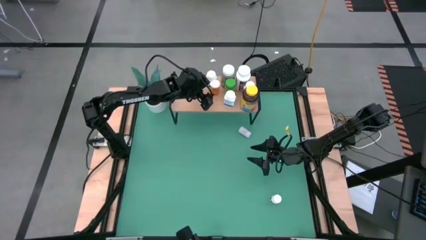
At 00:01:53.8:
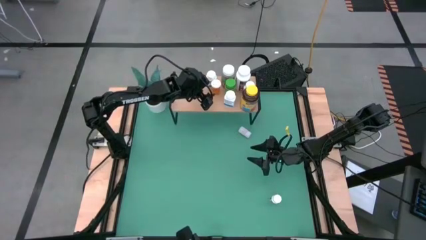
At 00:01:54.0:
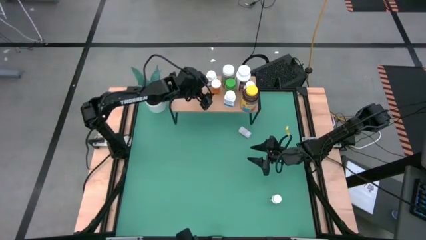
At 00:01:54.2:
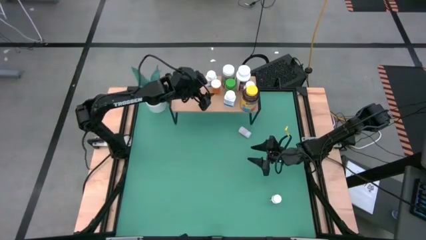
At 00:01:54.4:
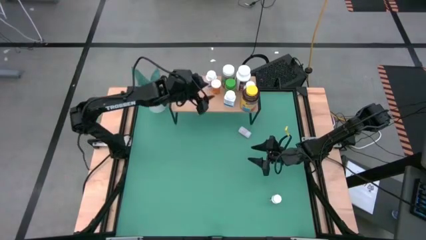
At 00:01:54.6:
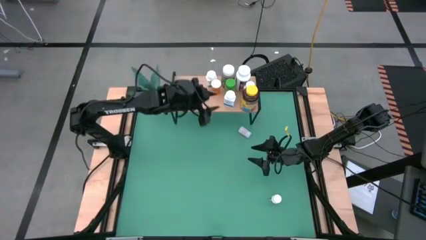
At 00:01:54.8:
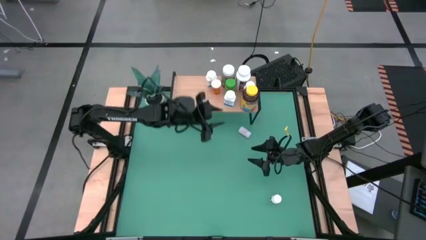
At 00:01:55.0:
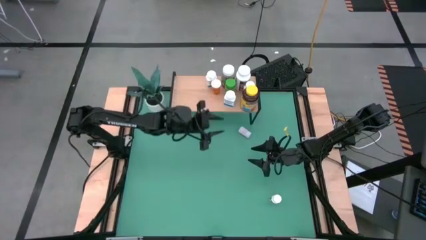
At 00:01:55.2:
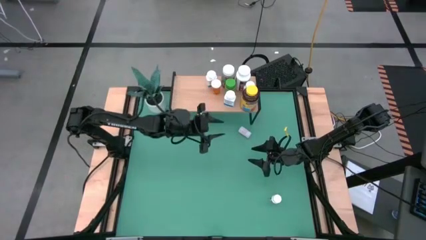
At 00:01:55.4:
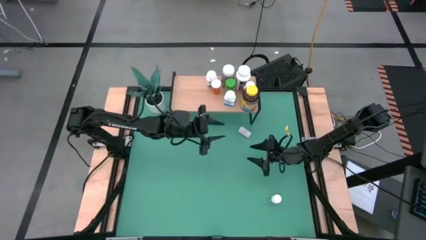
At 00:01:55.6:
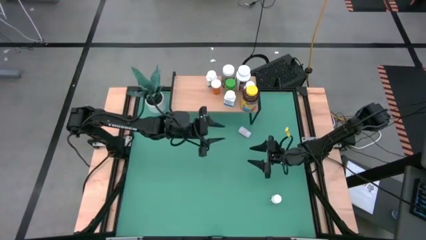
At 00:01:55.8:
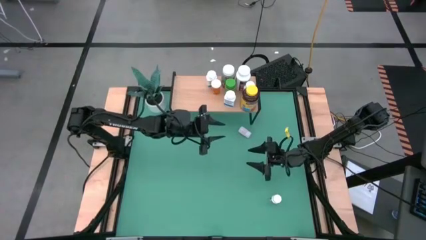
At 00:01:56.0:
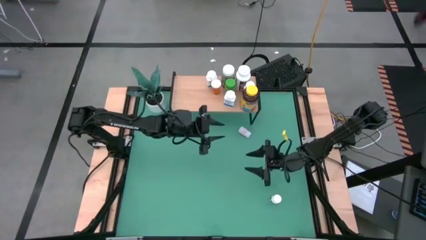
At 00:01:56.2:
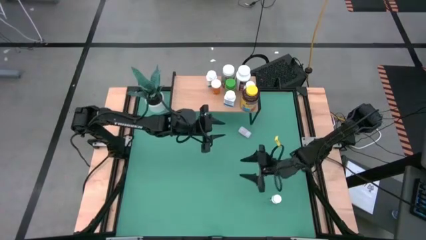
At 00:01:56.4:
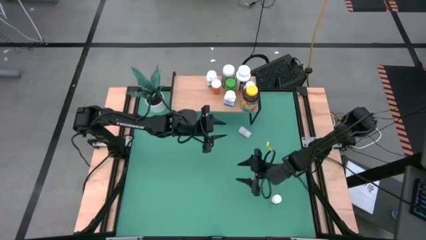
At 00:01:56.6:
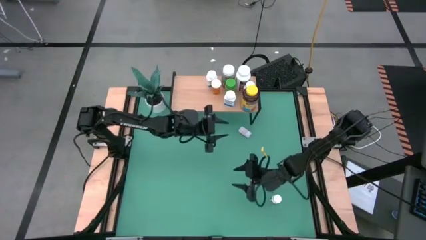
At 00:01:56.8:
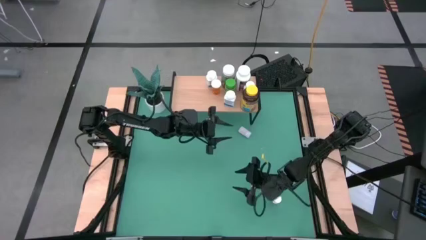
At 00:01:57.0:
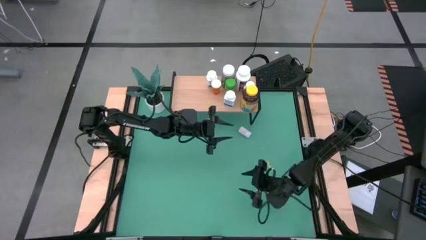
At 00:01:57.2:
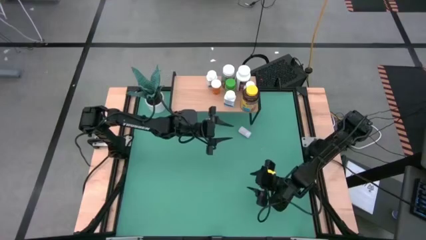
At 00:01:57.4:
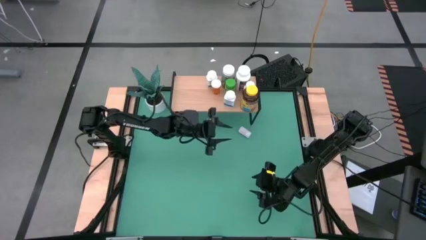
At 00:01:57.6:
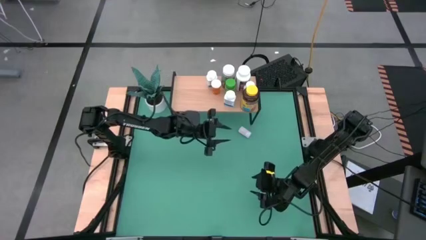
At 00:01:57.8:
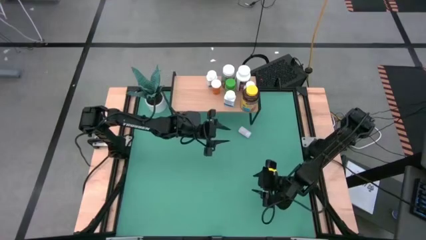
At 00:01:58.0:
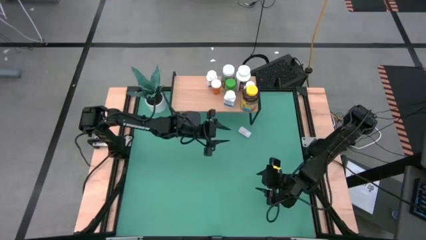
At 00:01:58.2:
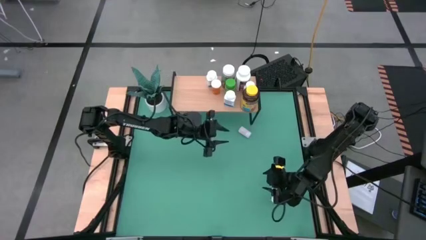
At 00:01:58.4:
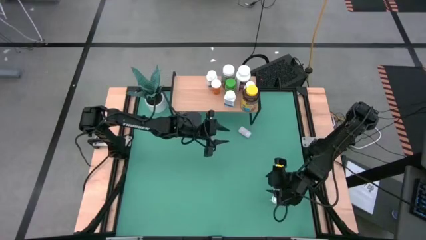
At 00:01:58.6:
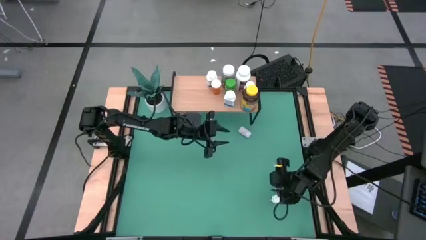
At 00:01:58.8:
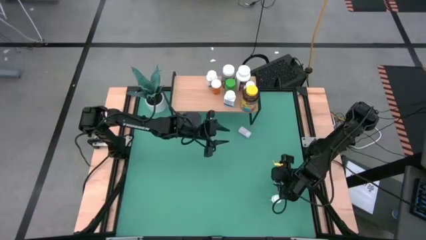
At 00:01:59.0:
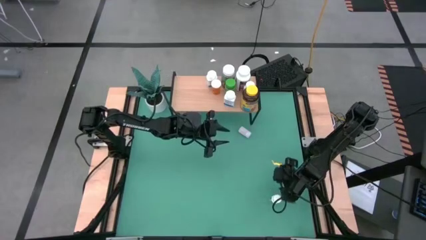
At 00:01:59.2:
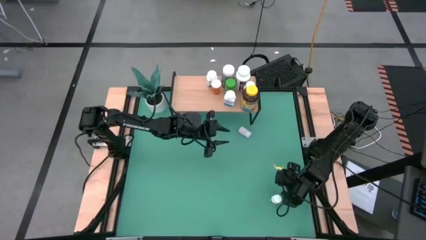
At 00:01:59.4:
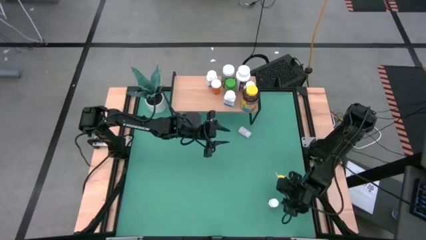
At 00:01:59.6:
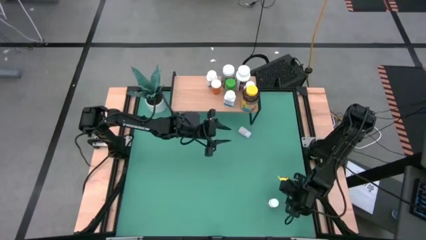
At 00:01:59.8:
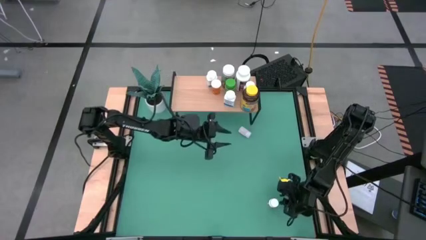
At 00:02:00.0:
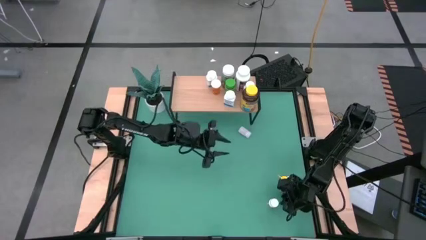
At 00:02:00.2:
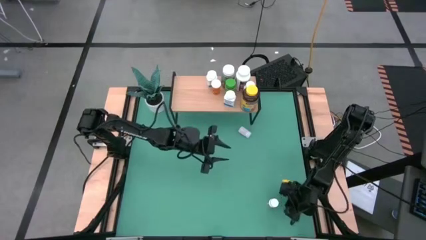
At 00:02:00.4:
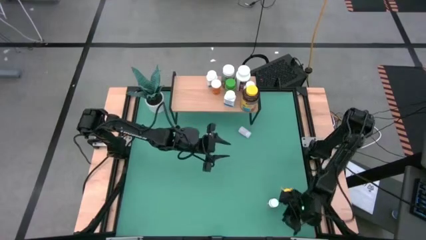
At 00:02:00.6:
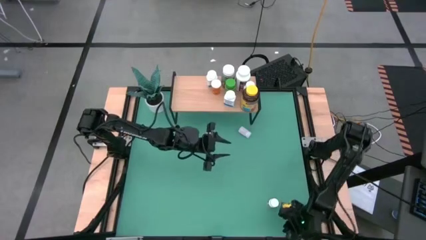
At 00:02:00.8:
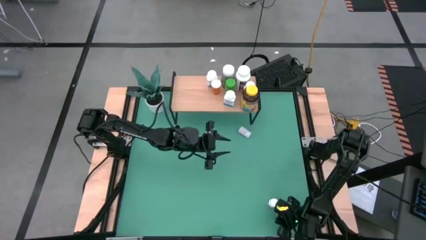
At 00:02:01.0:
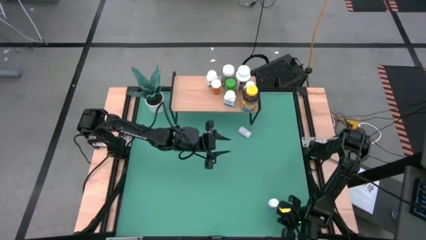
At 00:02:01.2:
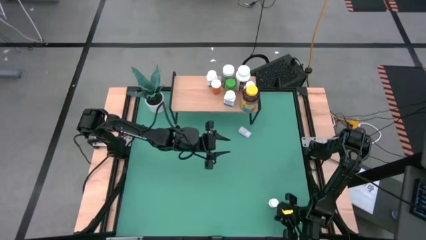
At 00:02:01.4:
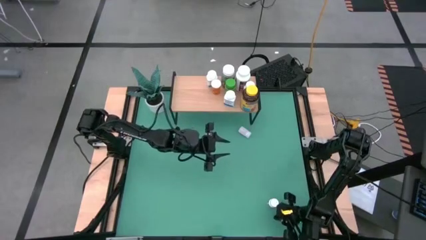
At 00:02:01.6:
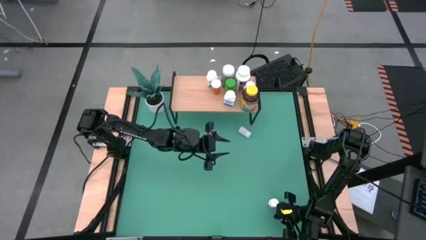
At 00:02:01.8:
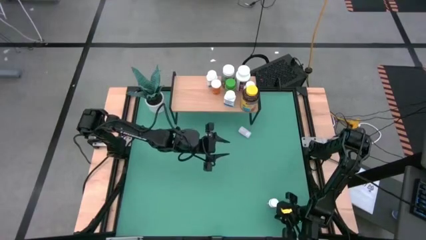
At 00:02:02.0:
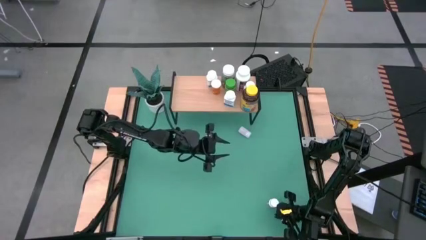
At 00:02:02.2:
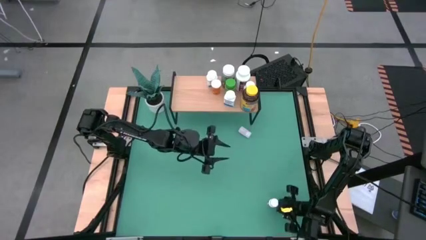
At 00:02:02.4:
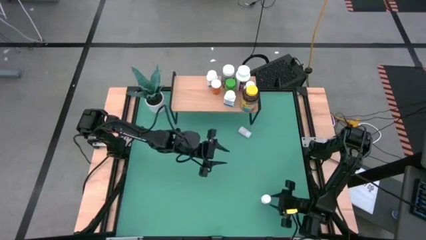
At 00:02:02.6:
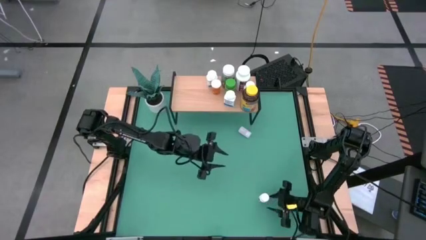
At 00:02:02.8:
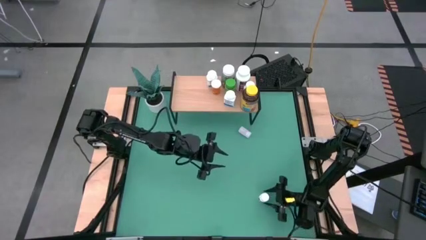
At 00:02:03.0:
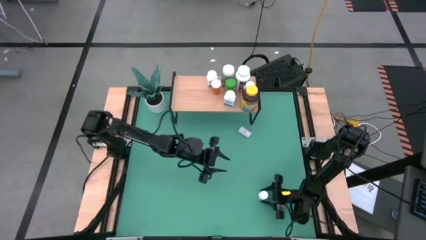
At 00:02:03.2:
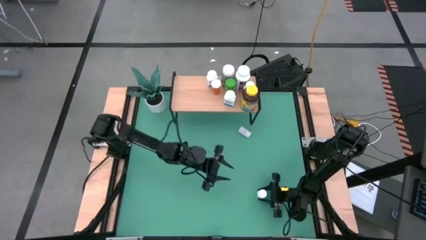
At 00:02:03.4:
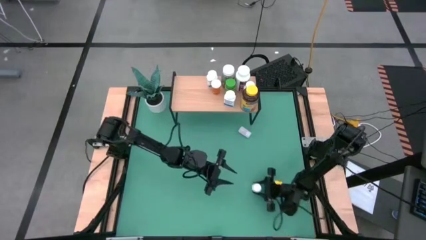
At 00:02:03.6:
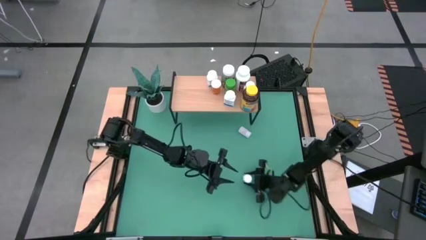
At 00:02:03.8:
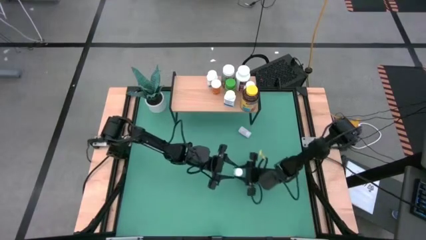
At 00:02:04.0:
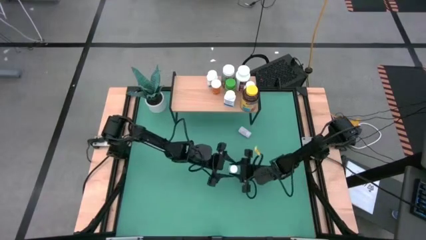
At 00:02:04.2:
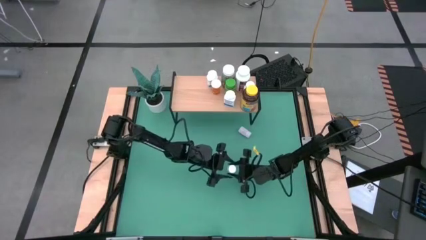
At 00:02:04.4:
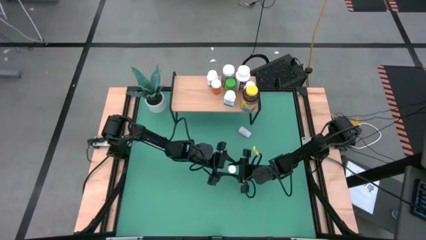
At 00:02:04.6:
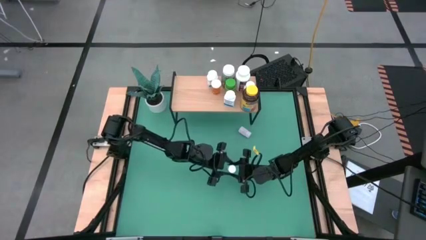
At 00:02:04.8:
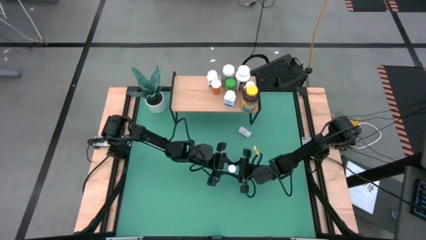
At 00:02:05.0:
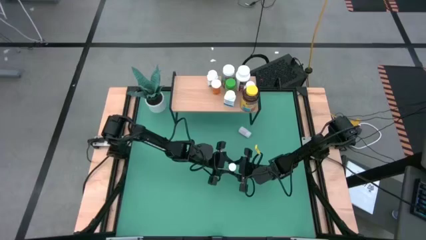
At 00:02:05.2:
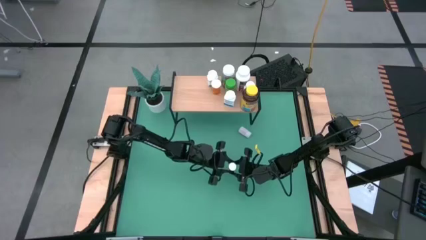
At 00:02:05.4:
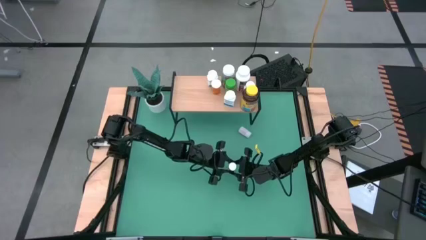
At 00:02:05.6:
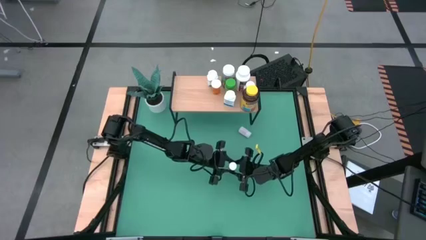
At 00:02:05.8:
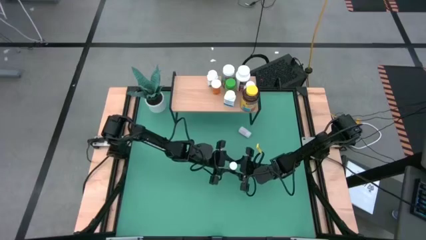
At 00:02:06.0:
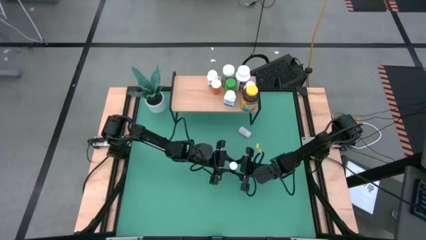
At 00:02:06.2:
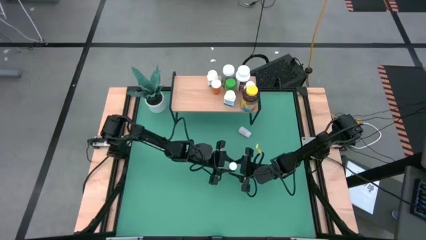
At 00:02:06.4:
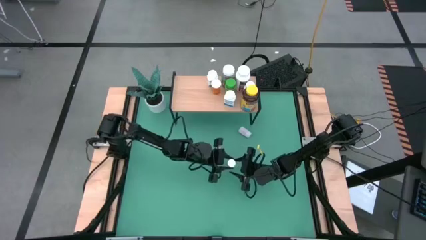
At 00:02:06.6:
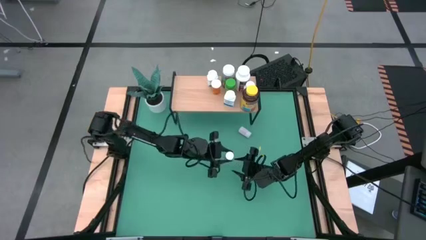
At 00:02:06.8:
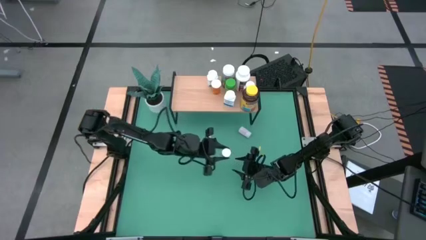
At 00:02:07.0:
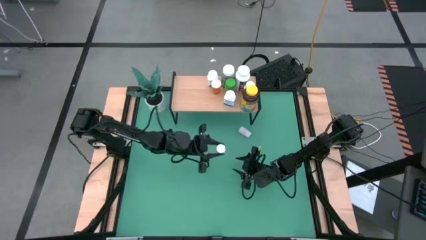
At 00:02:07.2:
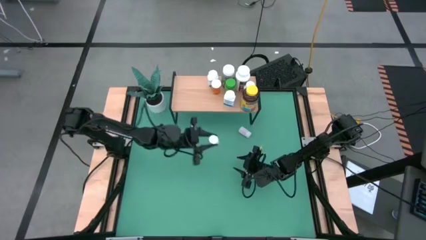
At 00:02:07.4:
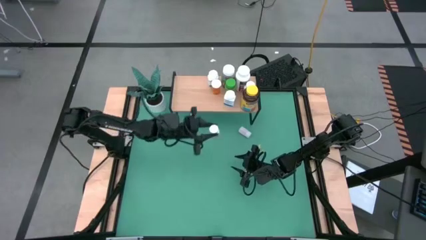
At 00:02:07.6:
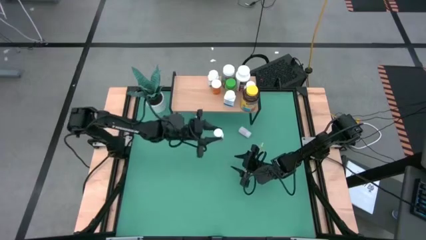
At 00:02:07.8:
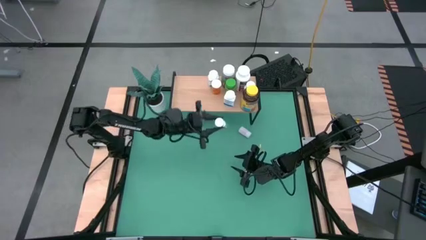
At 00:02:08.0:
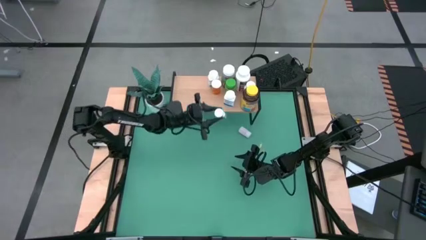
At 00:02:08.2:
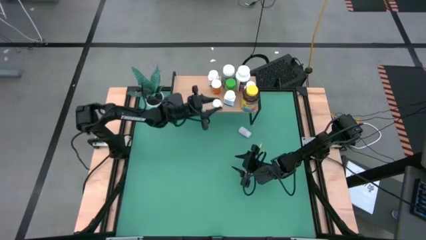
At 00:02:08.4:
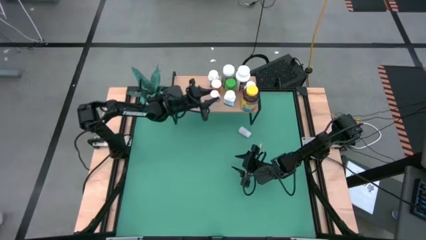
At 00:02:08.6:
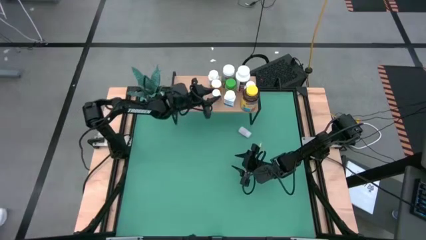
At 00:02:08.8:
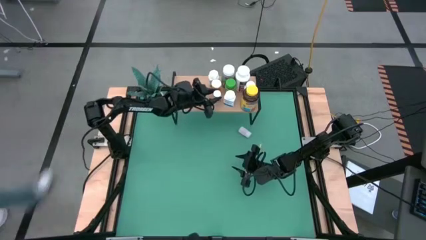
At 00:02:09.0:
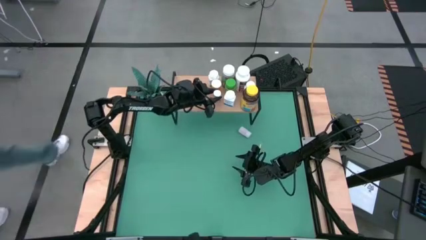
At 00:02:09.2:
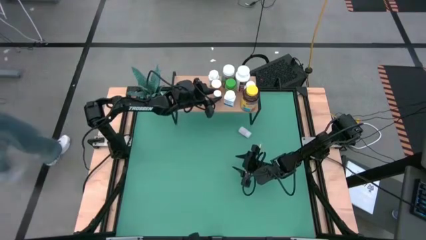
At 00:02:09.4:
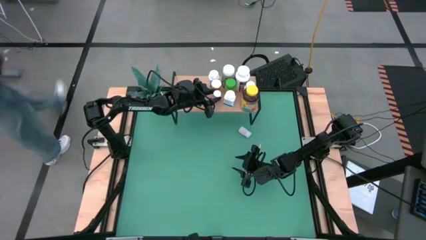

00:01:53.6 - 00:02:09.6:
Task: Pick and place medicine bottles onto shelf by color
Put the white medicine bottle on the shelf
